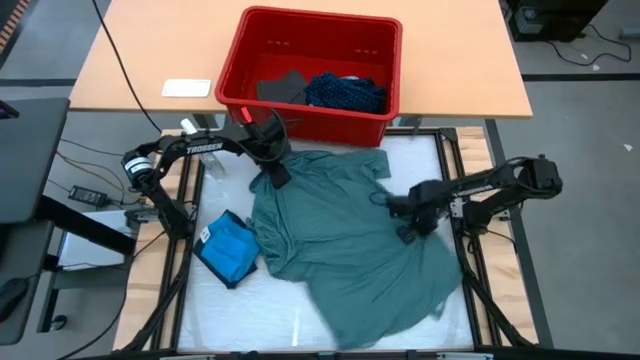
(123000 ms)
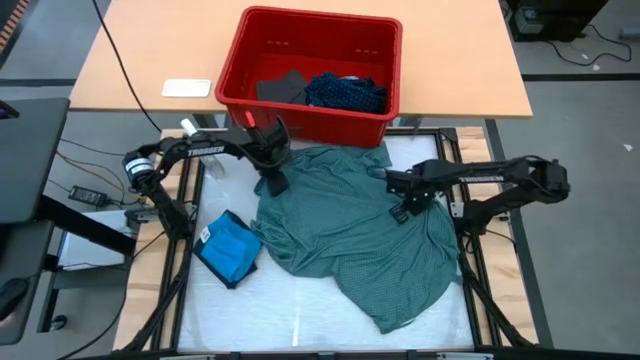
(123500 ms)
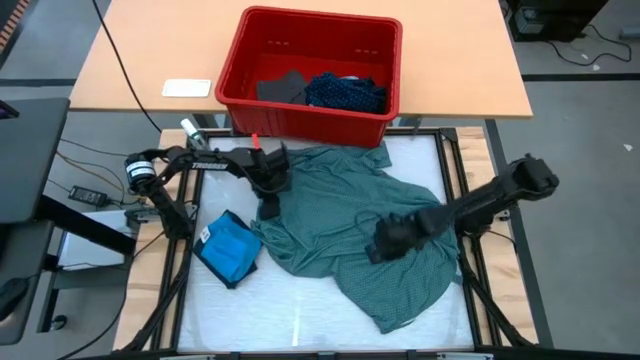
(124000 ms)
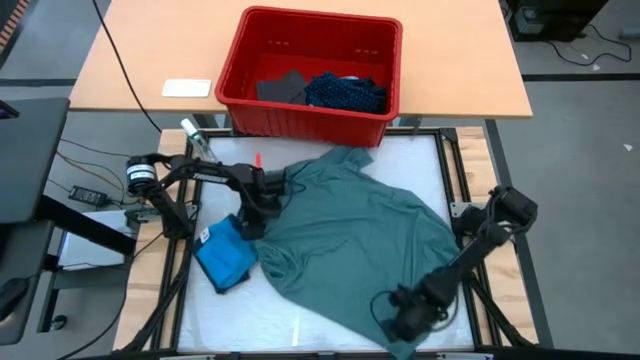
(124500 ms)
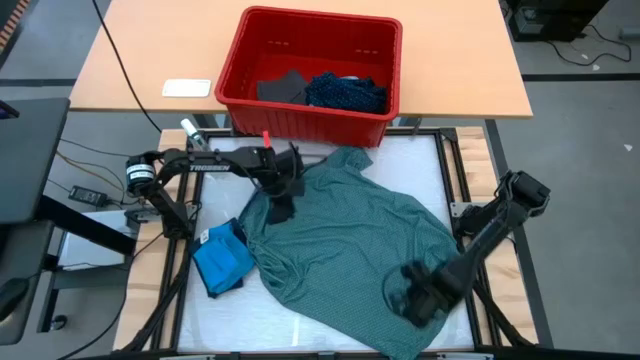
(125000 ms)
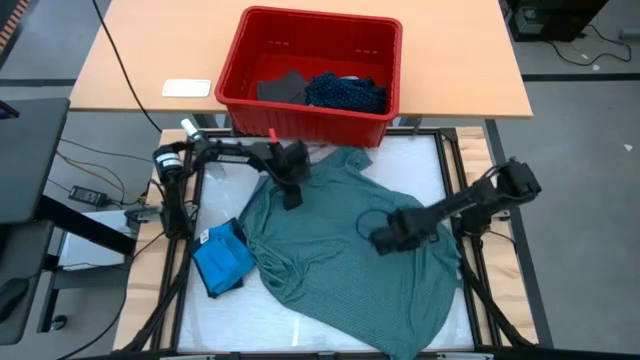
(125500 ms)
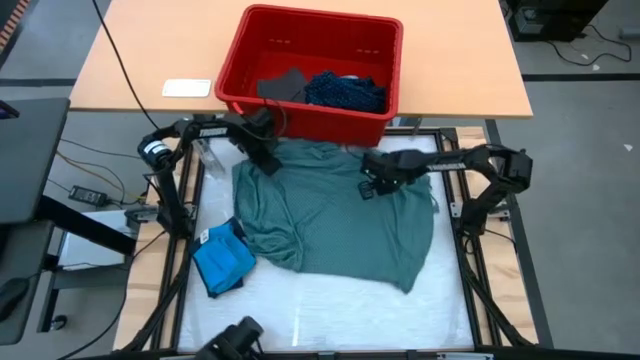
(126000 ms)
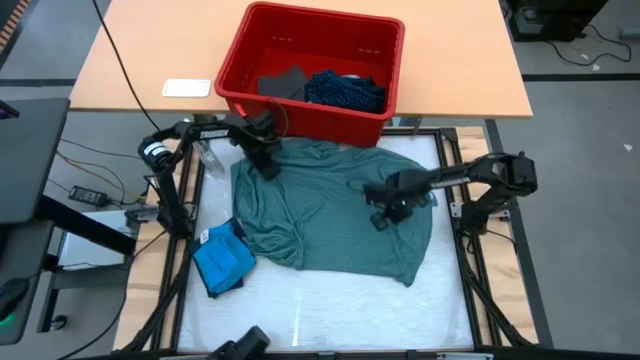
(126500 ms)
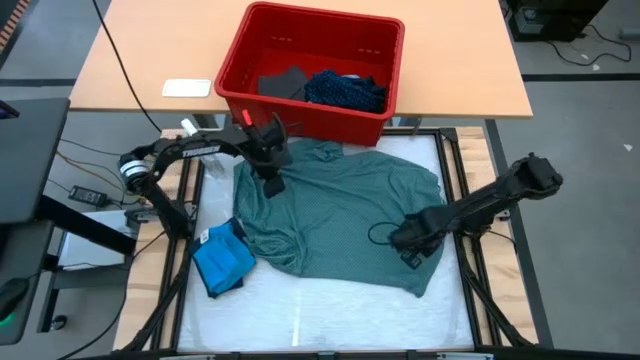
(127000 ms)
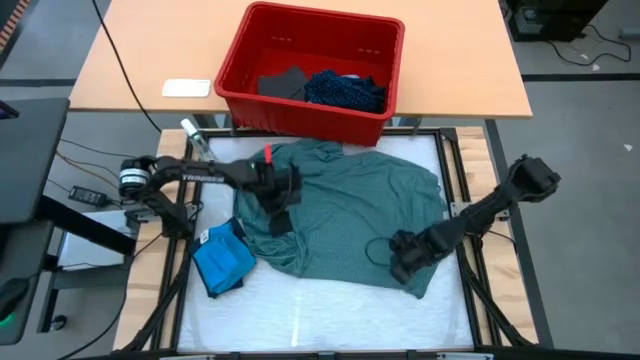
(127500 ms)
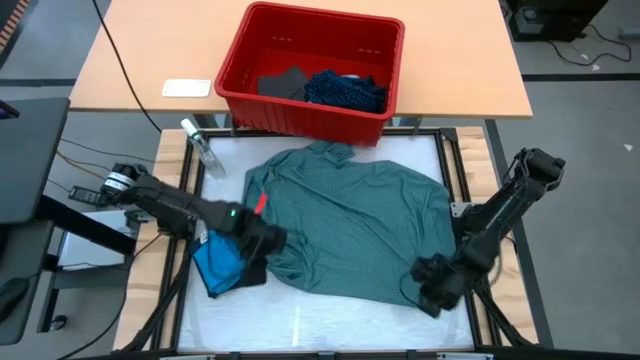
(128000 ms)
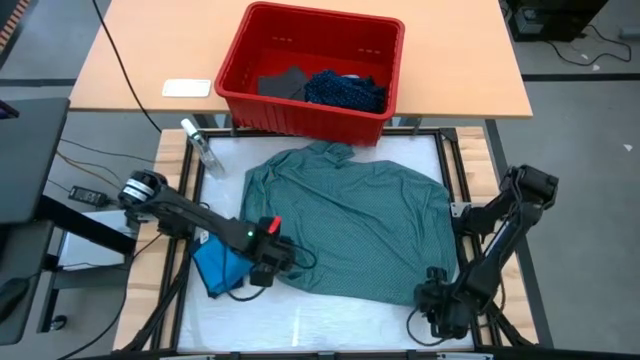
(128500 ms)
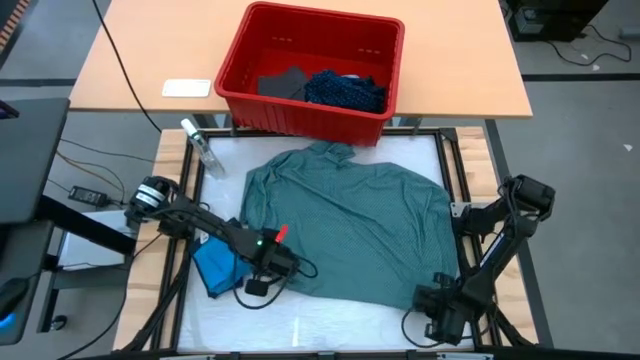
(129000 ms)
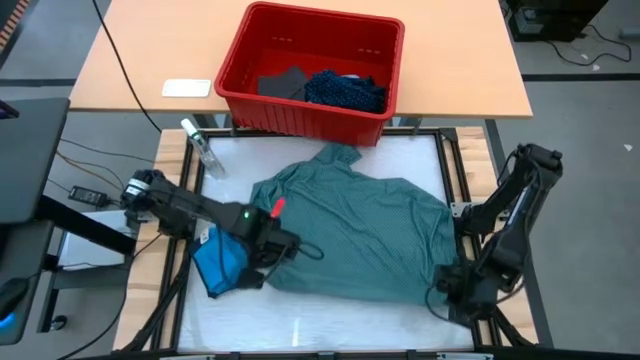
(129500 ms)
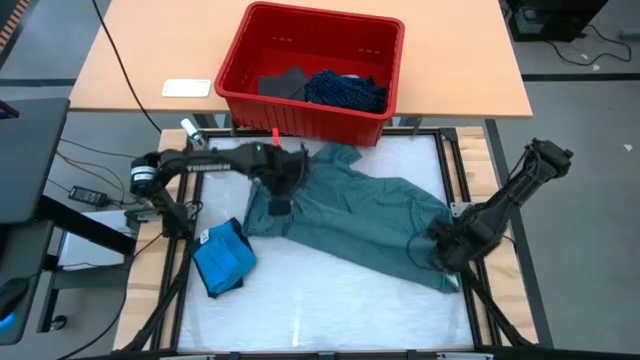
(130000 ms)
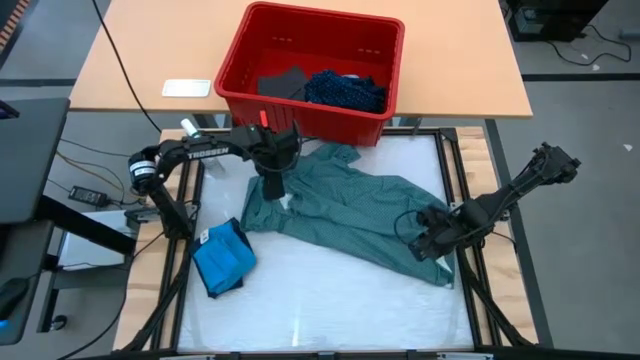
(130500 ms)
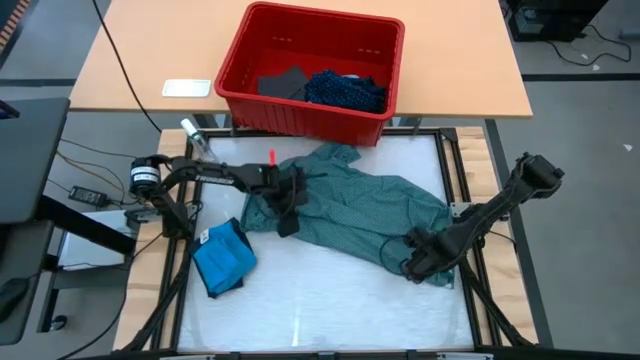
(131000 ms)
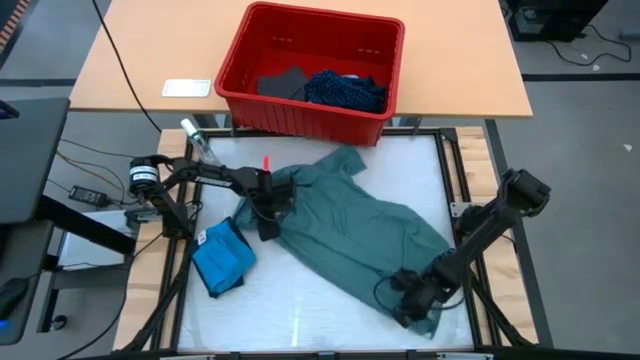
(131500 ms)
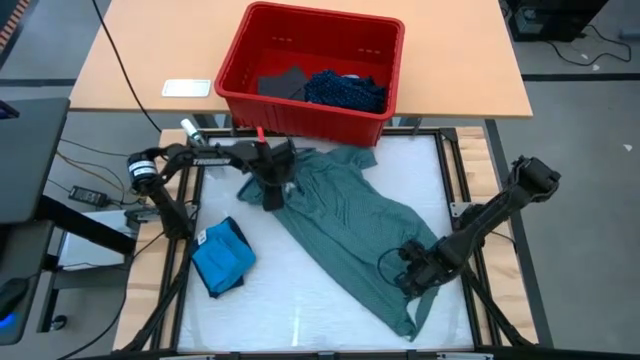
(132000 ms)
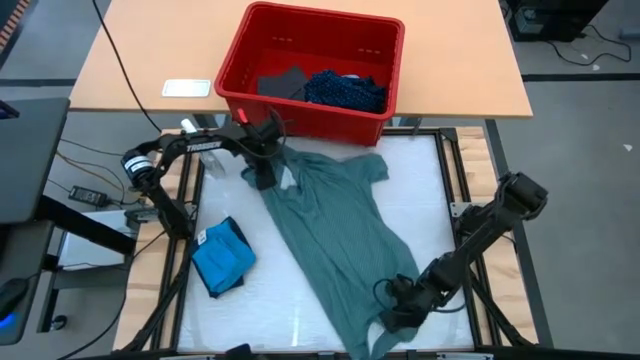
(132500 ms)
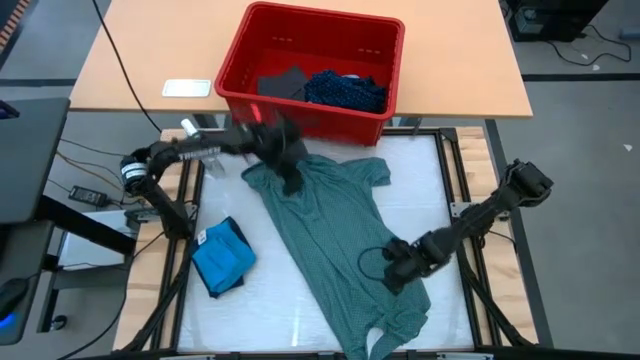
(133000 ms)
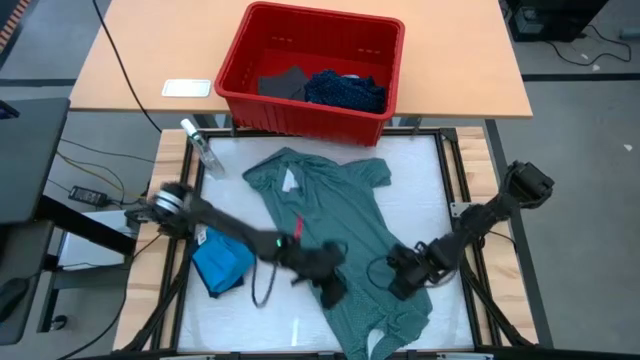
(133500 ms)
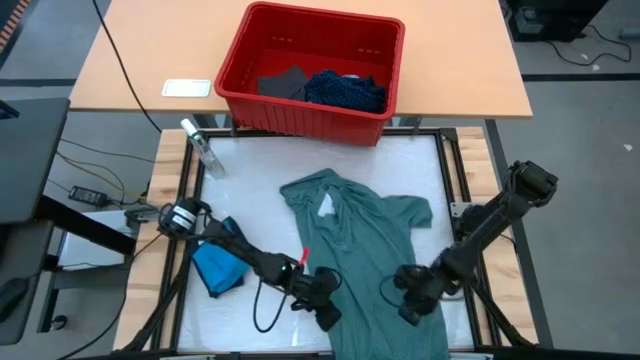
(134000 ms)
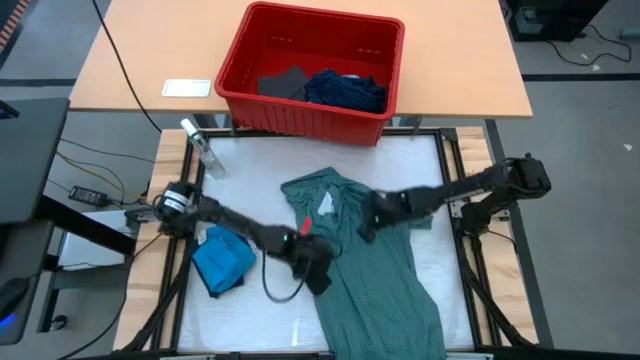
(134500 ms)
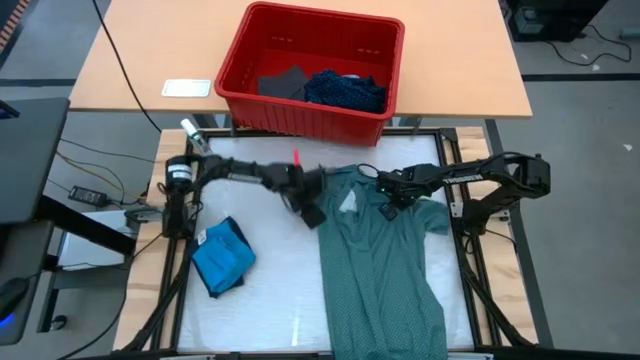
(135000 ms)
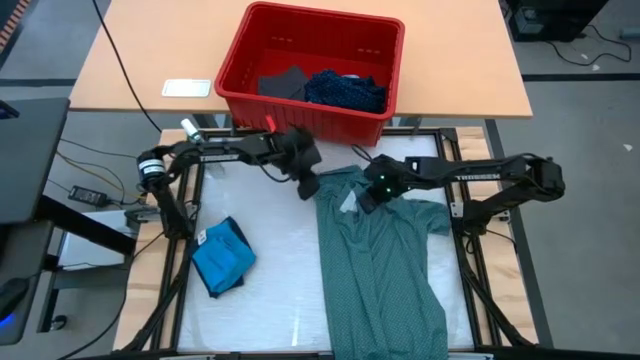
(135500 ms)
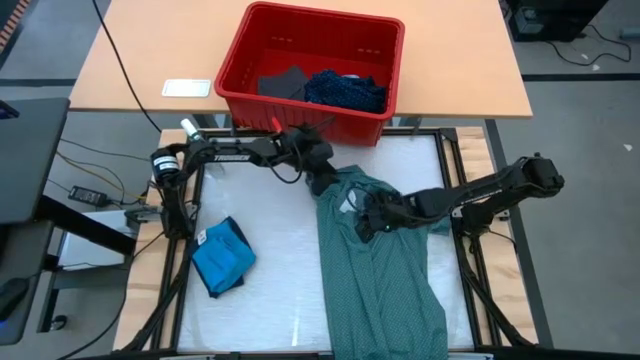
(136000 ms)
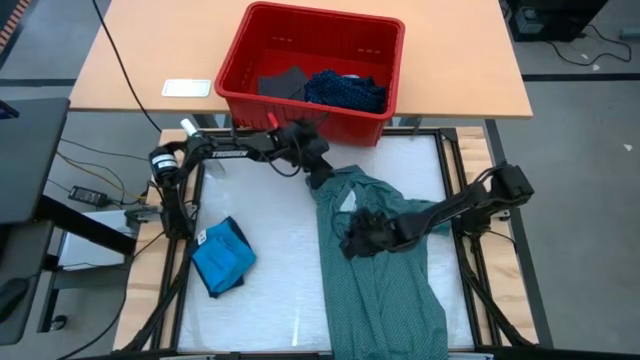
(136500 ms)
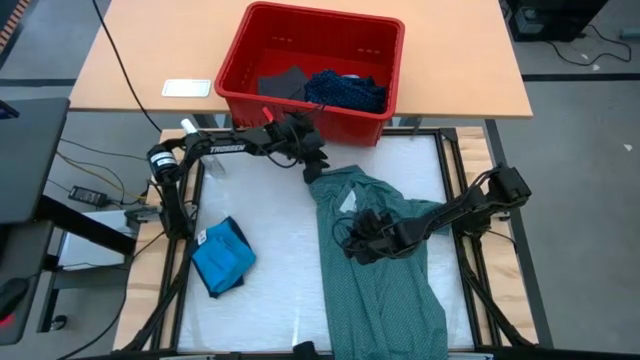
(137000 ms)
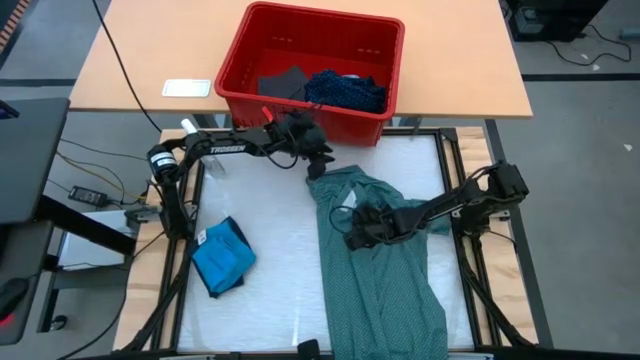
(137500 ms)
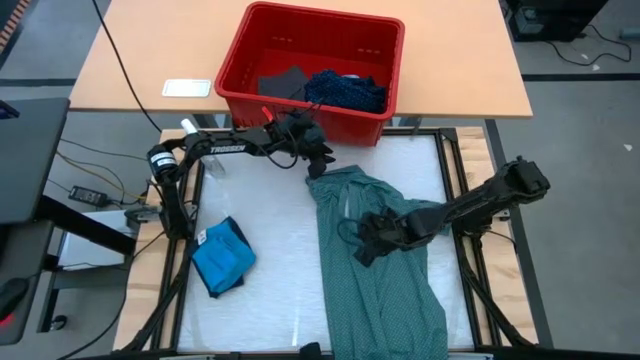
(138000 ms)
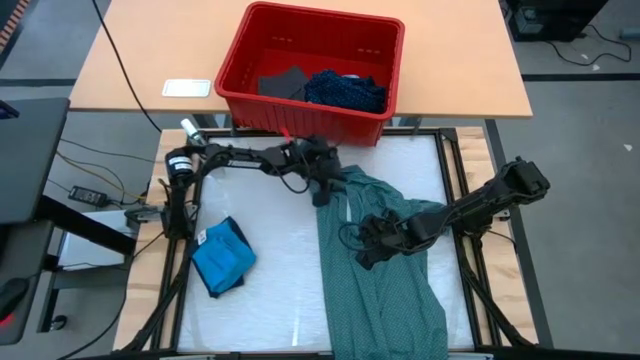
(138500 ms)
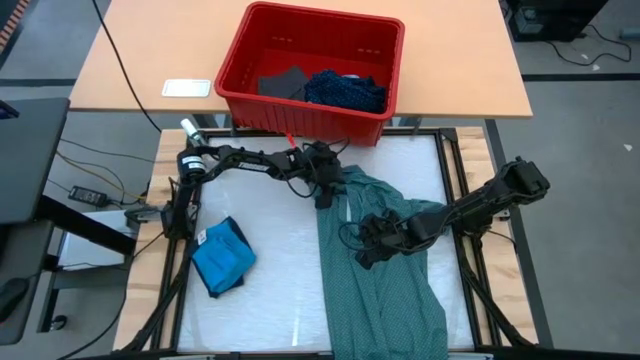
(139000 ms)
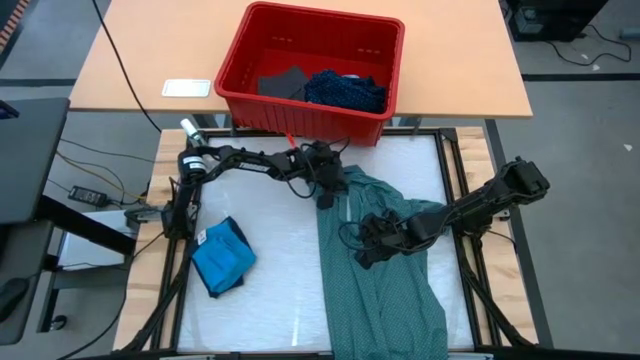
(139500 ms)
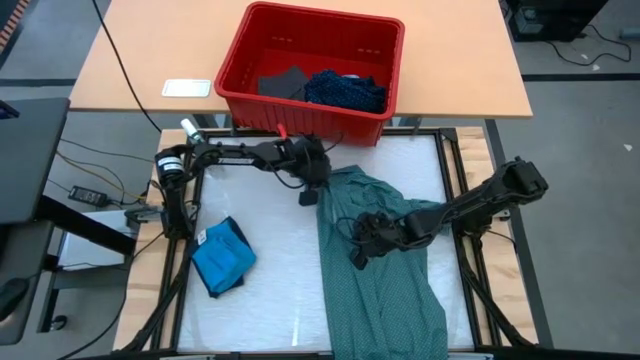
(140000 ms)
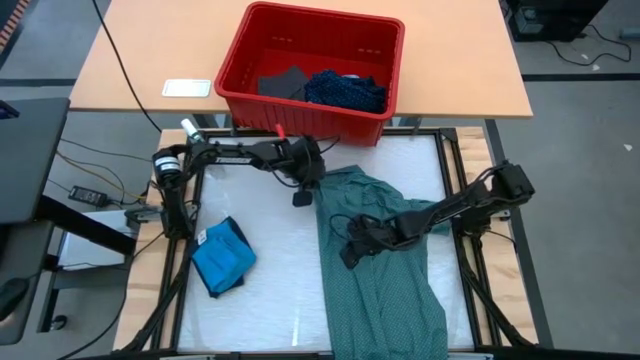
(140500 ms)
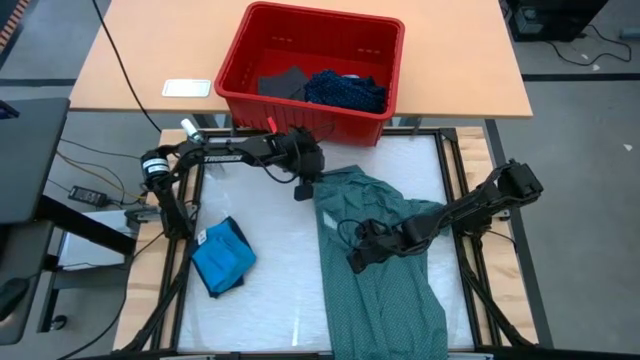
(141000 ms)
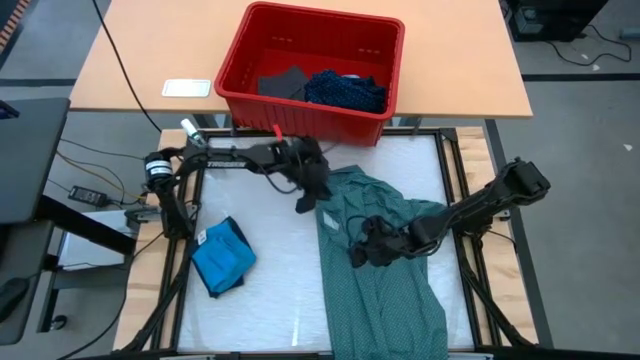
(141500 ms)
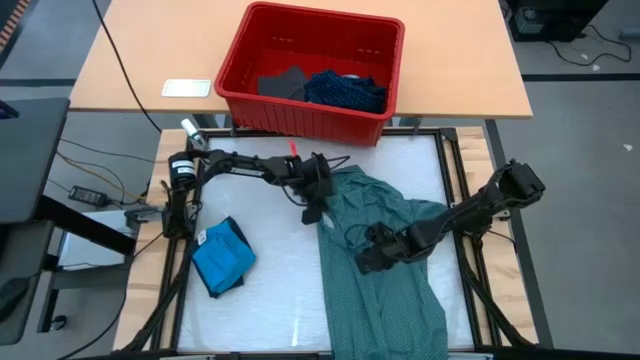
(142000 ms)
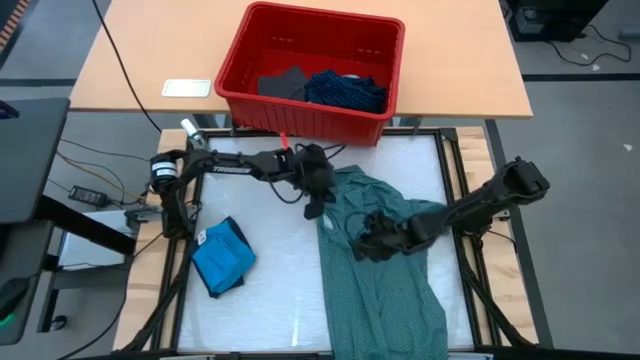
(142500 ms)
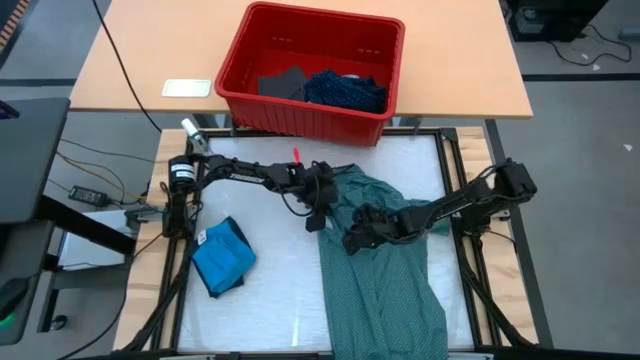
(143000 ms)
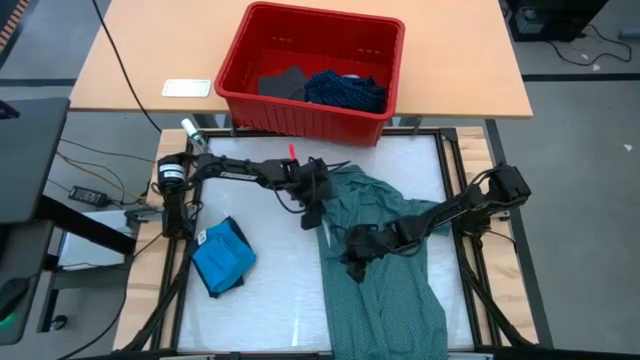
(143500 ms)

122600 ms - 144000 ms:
Task: Fold laundry
Fold the green polo shirt
